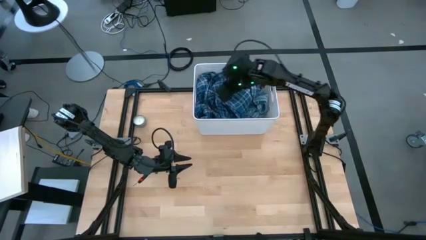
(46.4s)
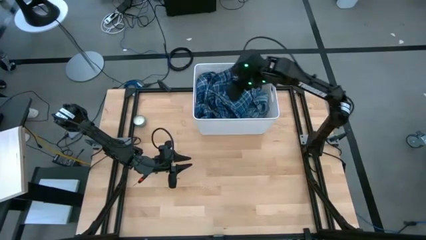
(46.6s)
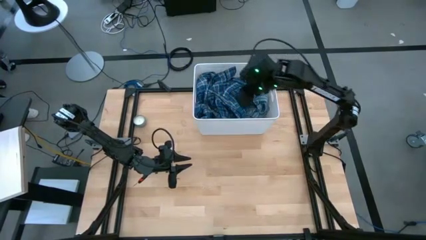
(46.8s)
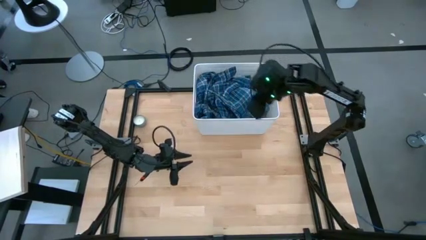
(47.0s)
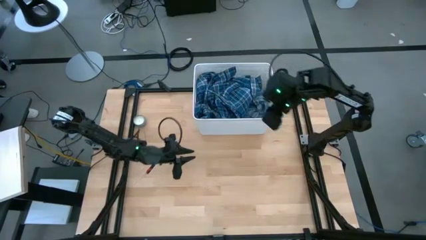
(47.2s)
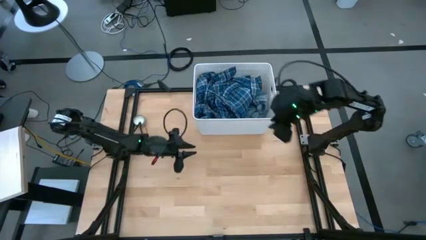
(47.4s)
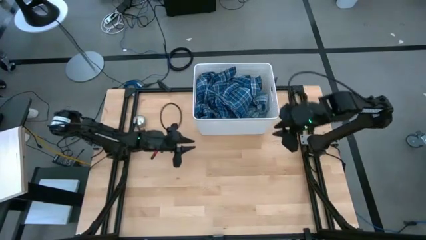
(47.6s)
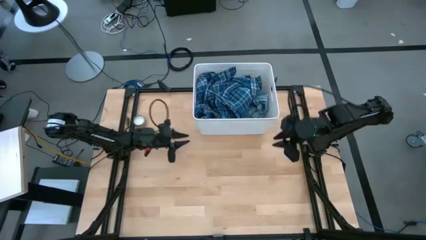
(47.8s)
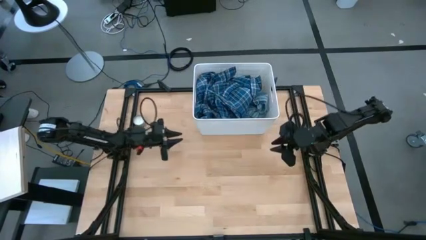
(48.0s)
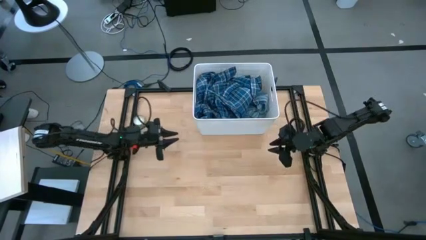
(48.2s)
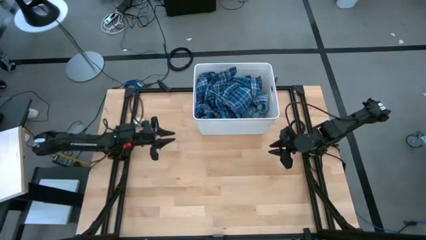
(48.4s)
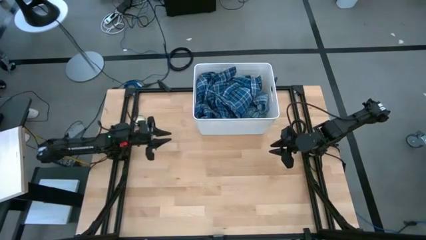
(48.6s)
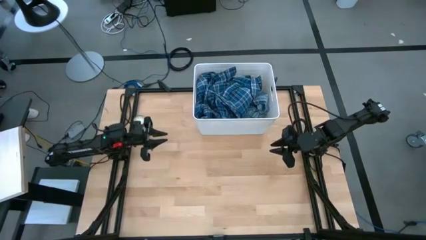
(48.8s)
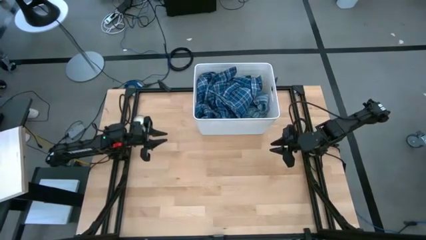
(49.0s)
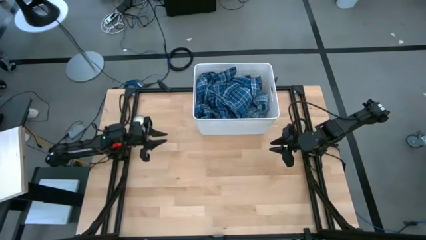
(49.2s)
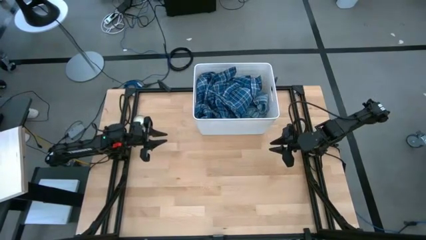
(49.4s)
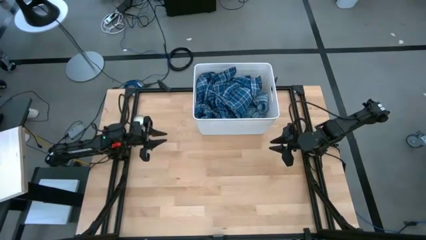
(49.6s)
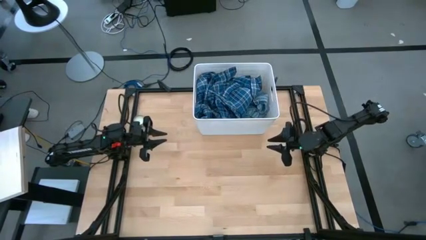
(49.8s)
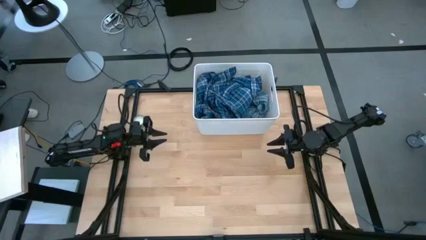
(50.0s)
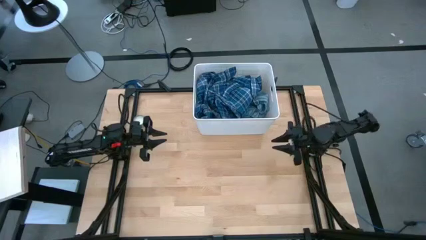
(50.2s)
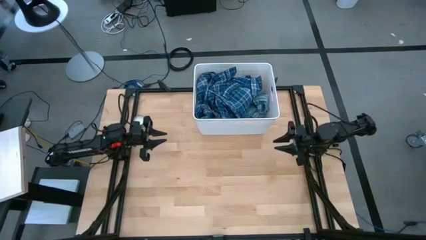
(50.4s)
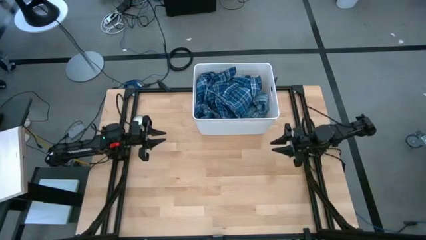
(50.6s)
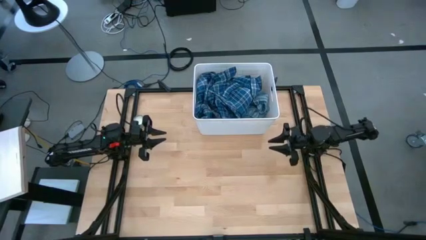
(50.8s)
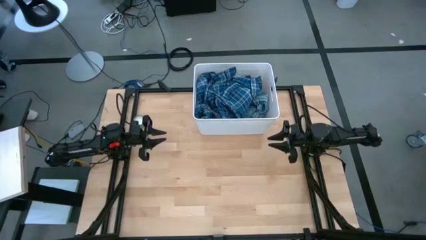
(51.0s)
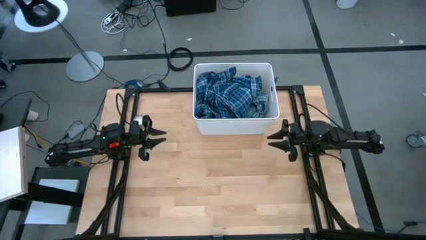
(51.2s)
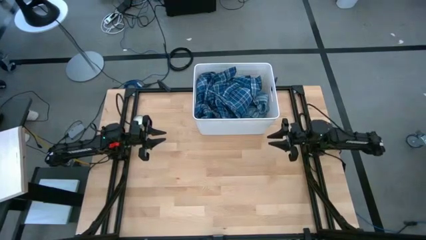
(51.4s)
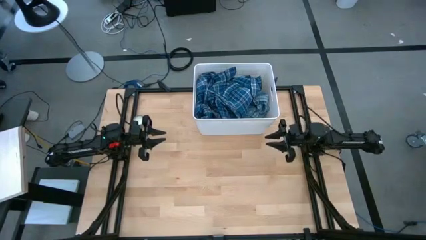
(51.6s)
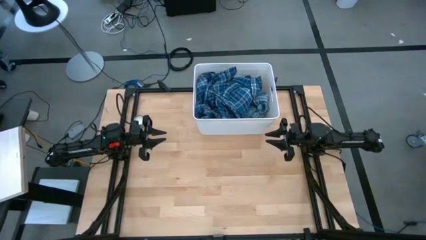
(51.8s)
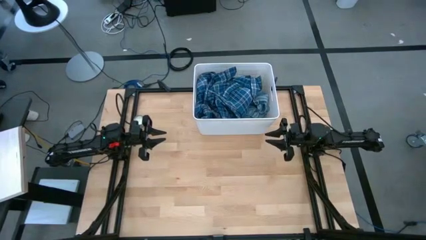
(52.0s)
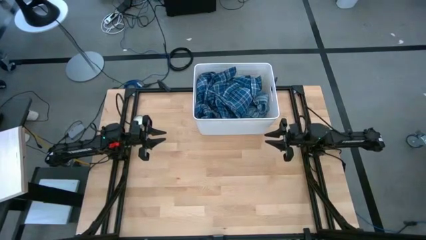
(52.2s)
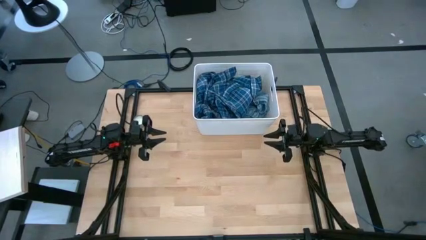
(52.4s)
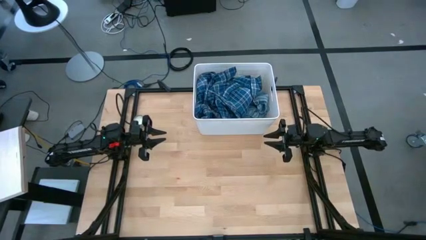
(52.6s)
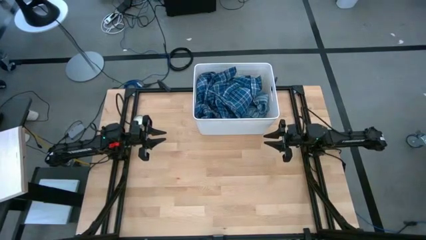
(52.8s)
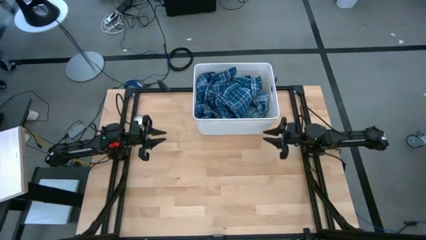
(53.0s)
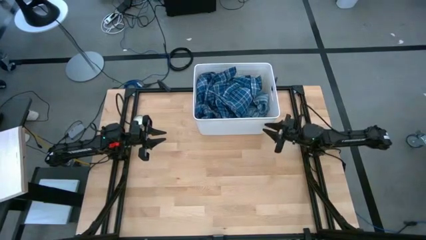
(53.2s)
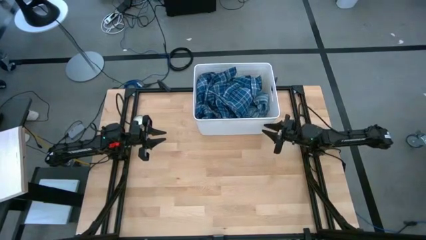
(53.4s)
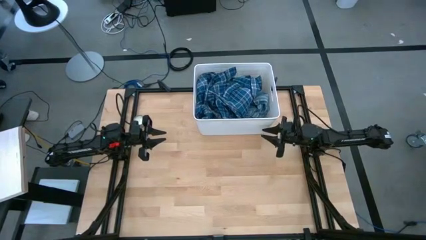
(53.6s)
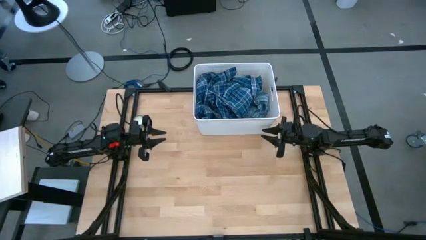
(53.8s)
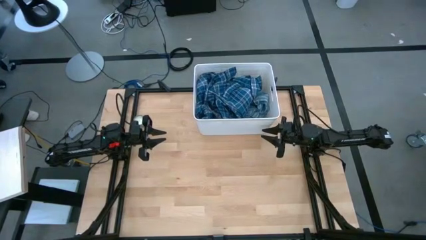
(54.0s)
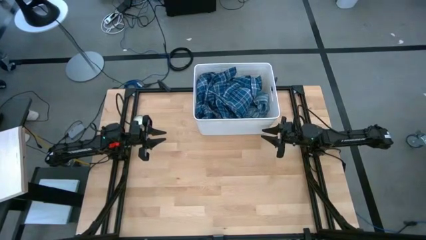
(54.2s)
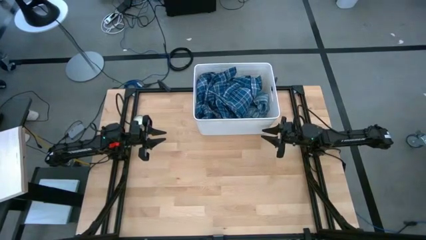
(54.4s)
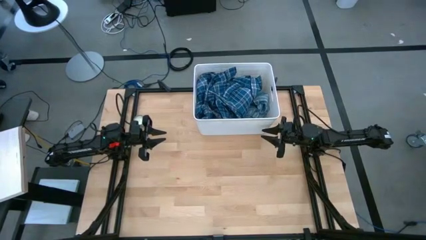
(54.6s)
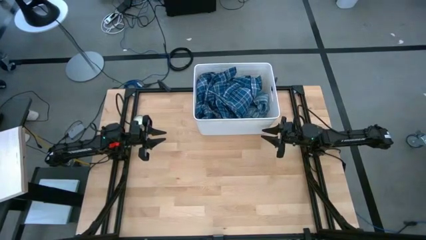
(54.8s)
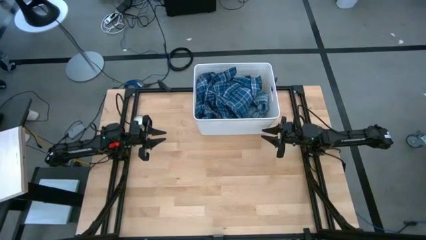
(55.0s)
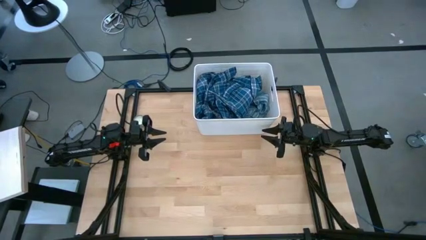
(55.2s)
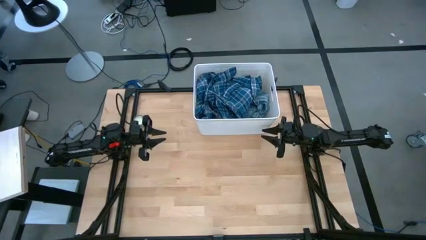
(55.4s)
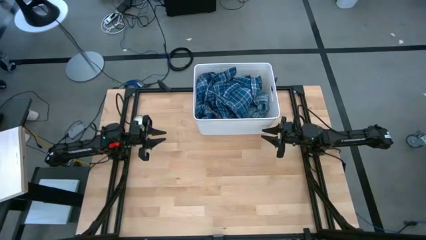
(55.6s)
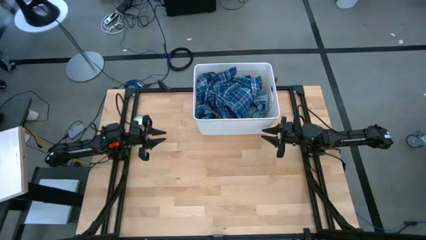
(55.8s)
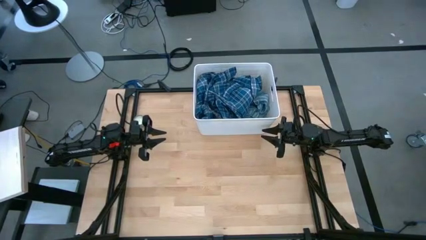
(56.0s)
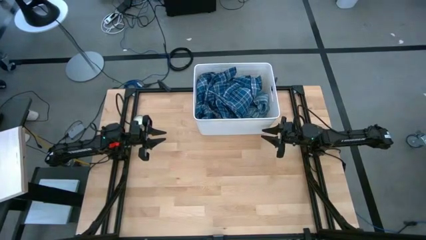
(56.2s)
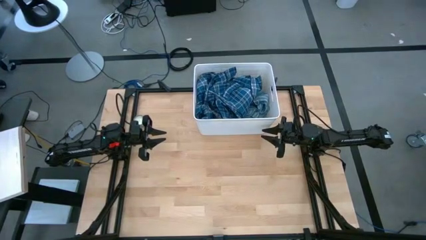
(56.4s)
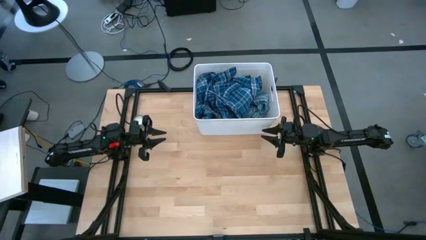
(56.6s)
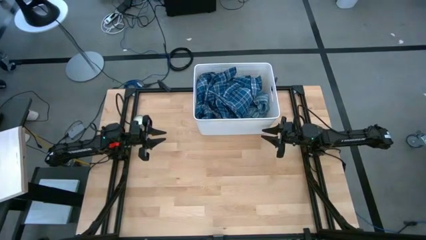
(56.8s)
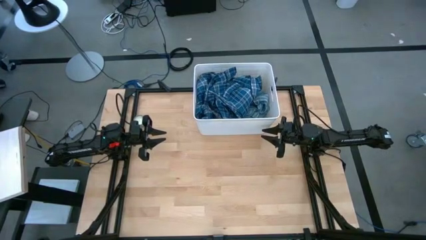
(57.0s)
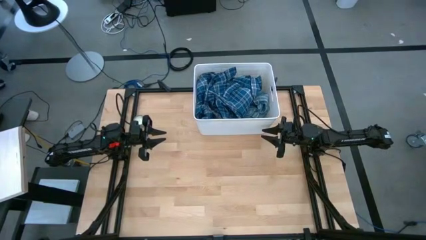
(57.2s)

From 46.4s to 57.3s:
Task: Sort clothes
Return to Home Position
